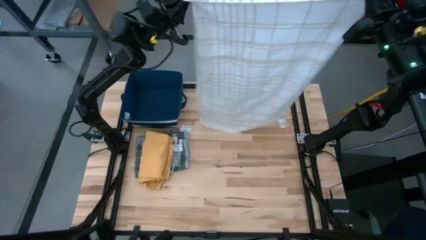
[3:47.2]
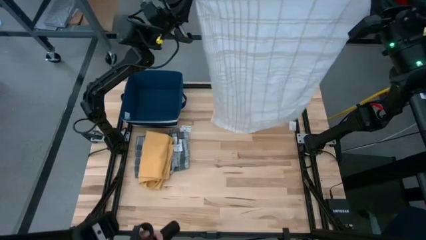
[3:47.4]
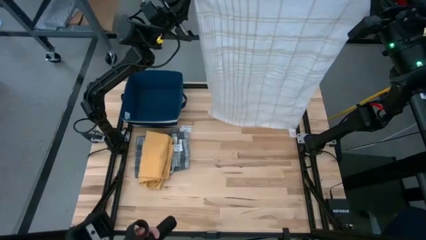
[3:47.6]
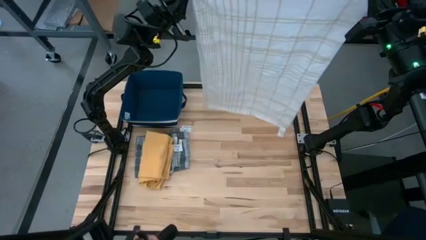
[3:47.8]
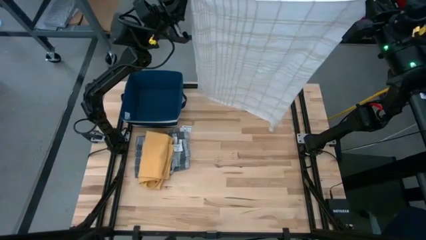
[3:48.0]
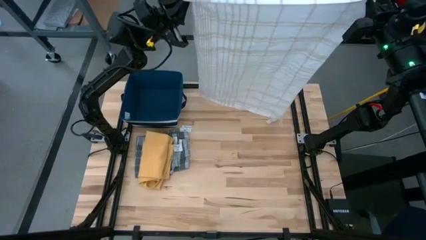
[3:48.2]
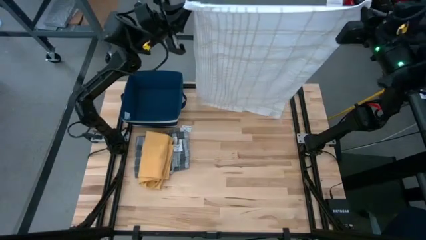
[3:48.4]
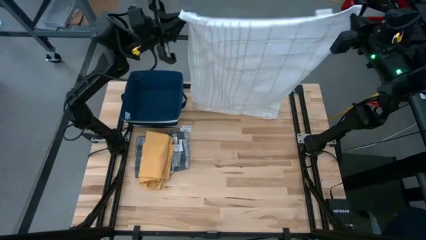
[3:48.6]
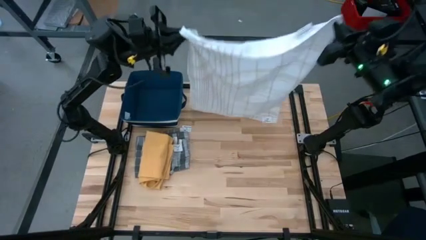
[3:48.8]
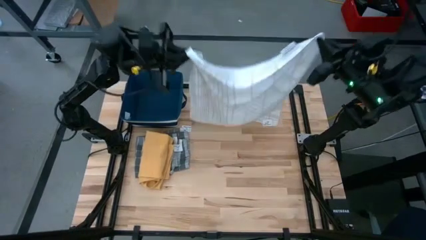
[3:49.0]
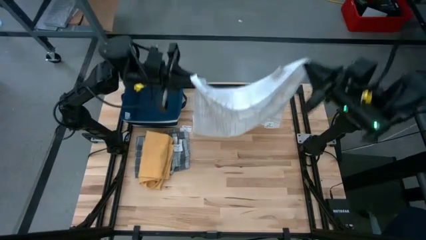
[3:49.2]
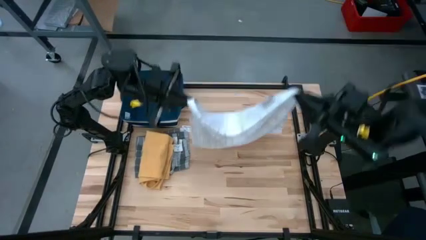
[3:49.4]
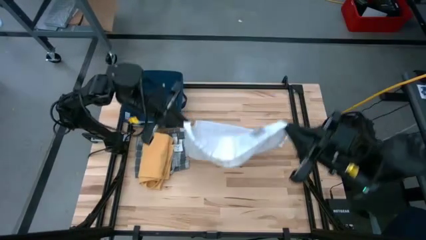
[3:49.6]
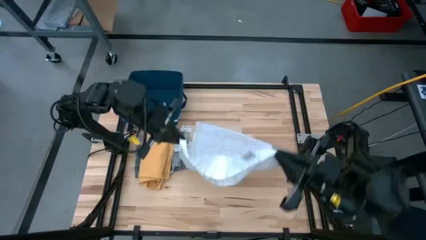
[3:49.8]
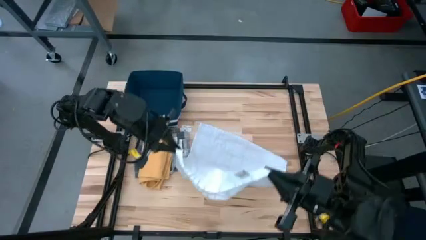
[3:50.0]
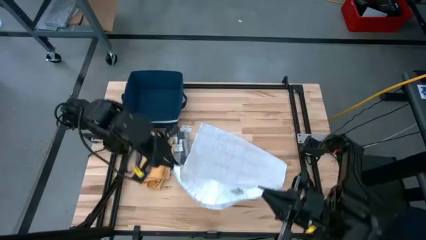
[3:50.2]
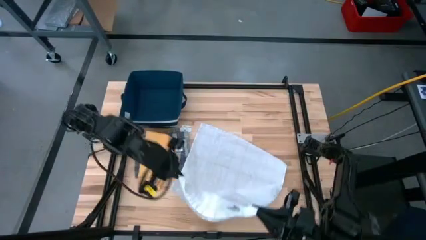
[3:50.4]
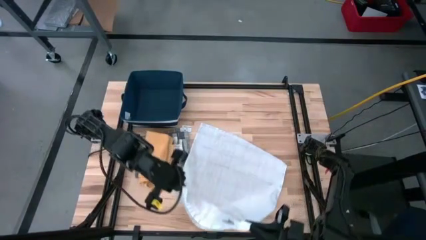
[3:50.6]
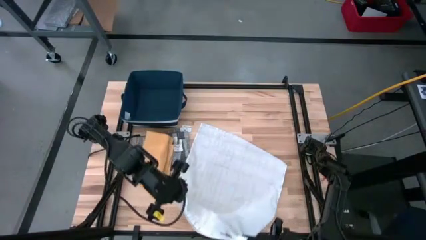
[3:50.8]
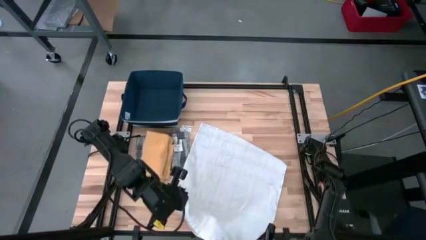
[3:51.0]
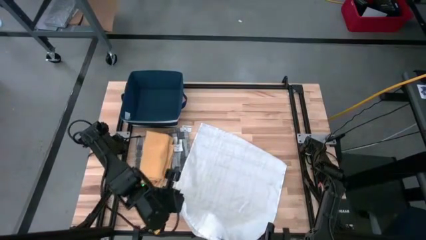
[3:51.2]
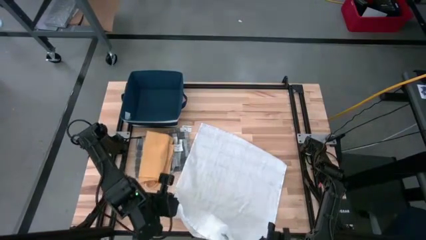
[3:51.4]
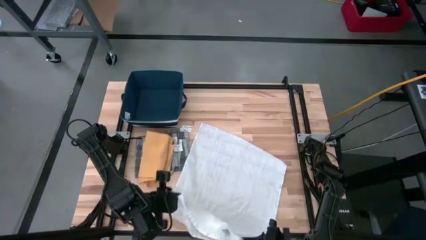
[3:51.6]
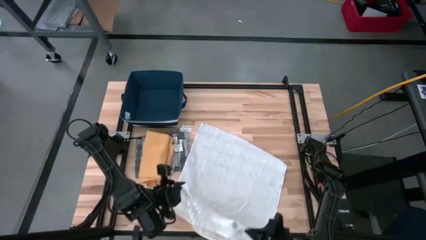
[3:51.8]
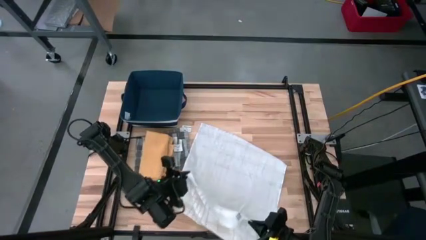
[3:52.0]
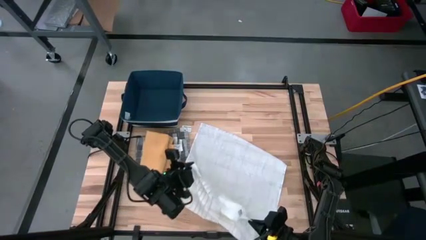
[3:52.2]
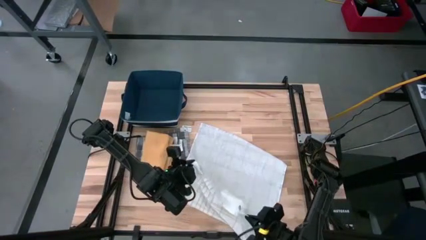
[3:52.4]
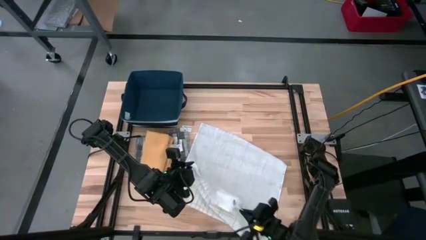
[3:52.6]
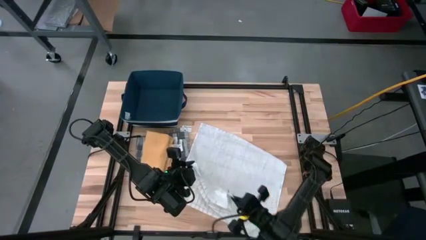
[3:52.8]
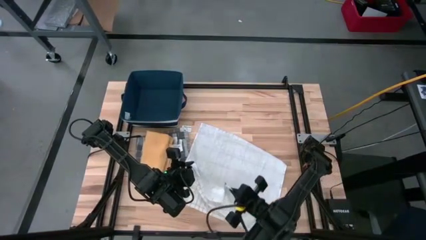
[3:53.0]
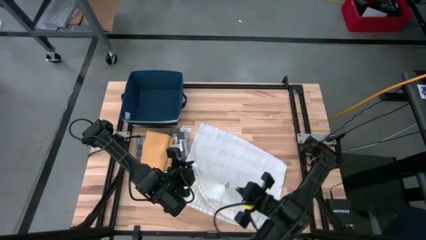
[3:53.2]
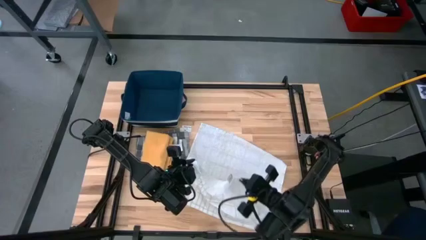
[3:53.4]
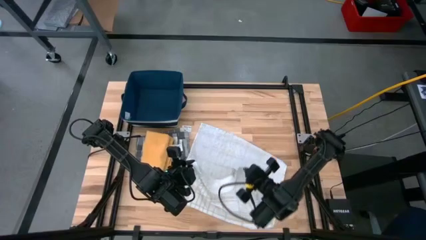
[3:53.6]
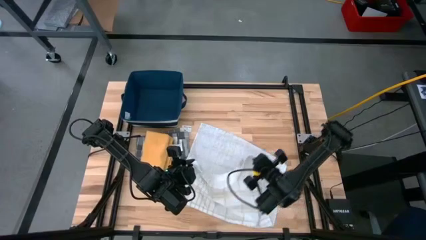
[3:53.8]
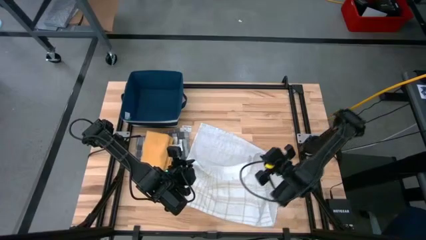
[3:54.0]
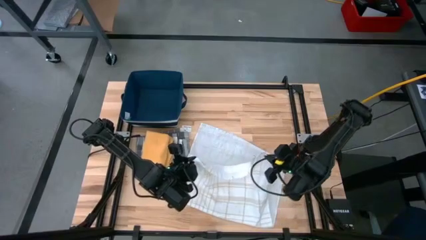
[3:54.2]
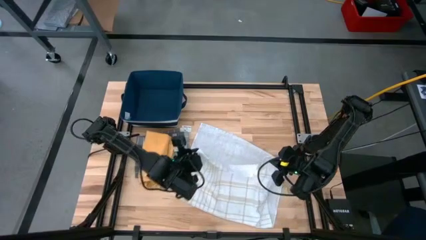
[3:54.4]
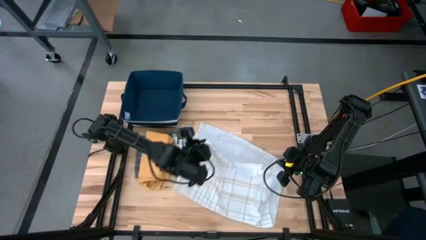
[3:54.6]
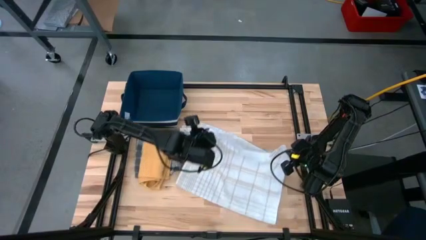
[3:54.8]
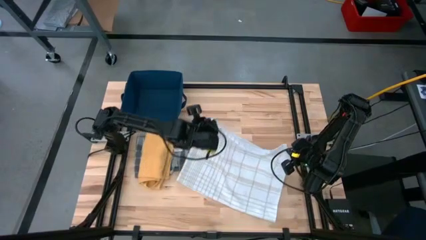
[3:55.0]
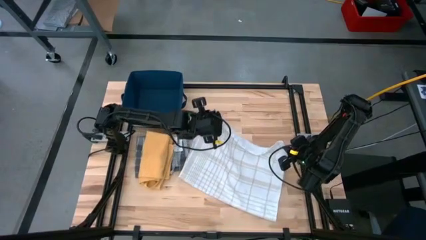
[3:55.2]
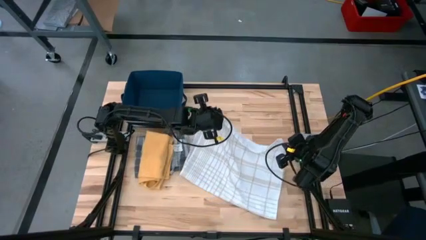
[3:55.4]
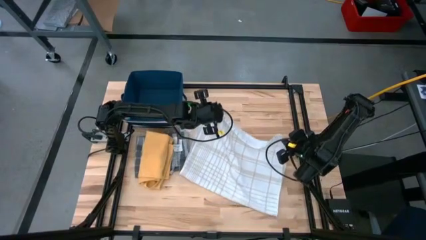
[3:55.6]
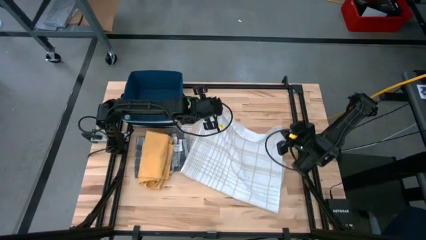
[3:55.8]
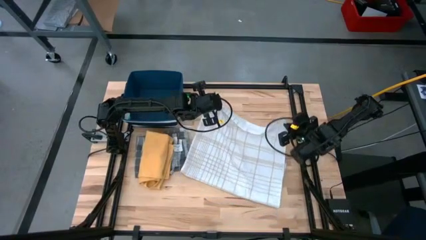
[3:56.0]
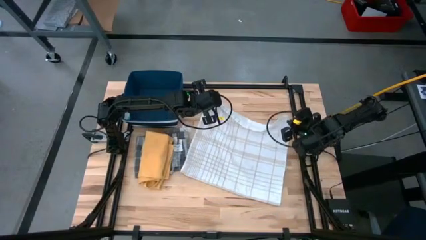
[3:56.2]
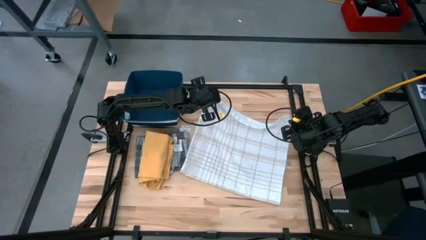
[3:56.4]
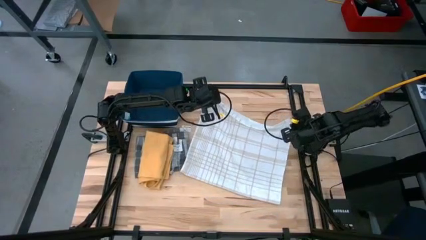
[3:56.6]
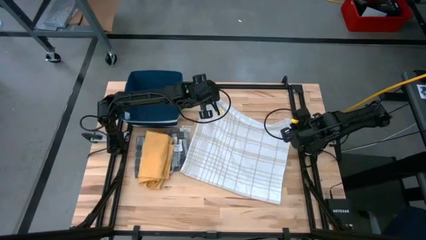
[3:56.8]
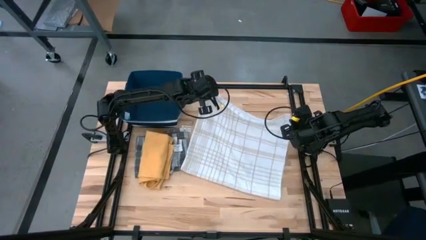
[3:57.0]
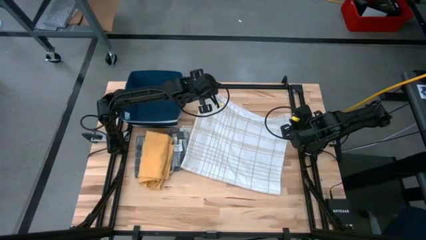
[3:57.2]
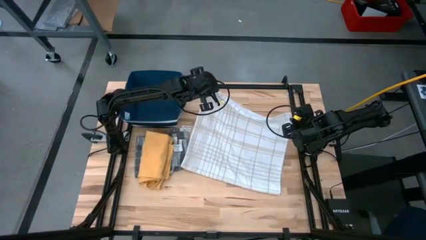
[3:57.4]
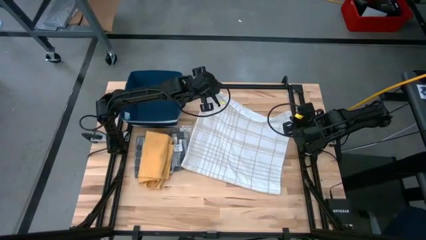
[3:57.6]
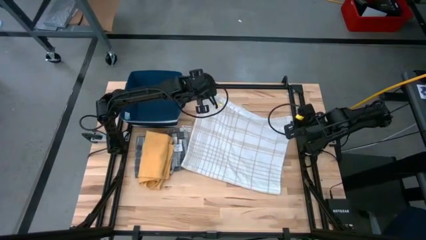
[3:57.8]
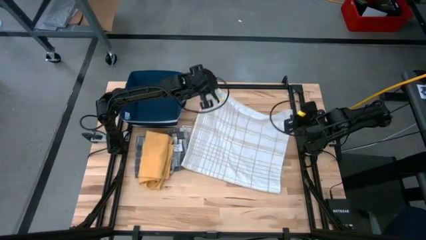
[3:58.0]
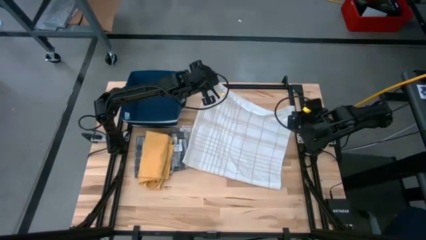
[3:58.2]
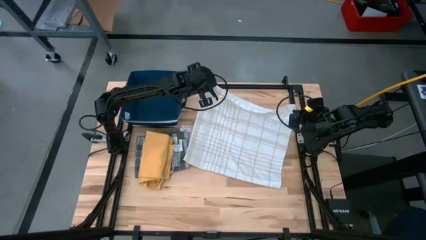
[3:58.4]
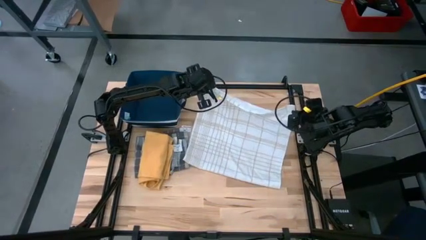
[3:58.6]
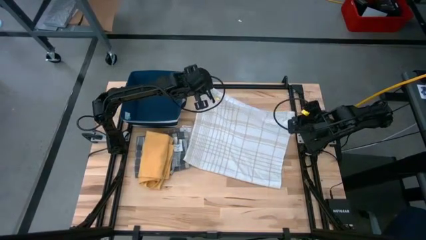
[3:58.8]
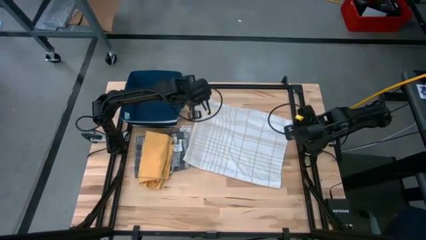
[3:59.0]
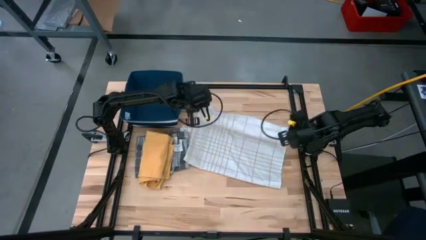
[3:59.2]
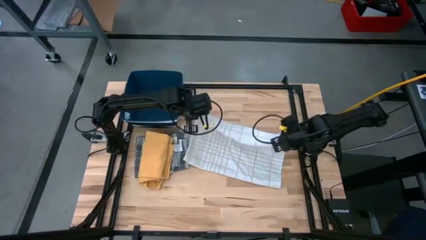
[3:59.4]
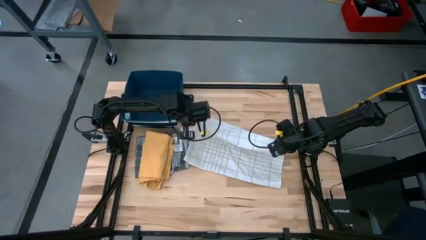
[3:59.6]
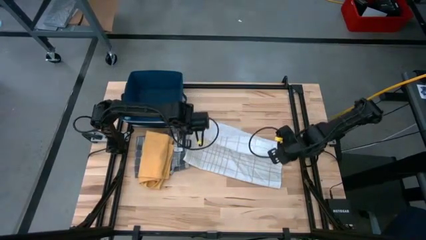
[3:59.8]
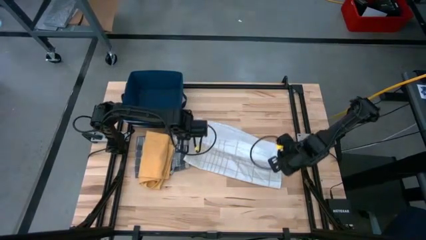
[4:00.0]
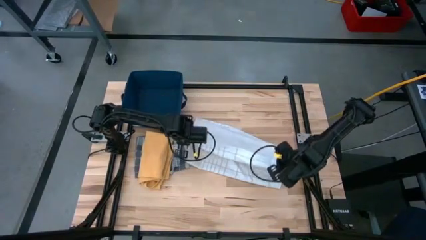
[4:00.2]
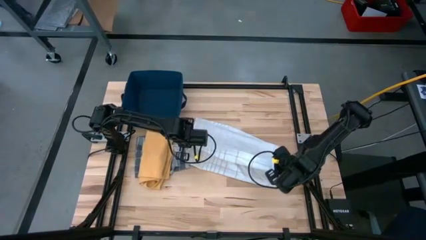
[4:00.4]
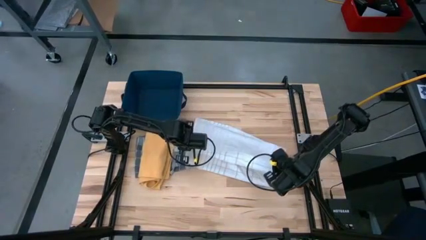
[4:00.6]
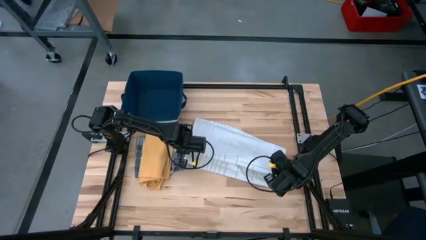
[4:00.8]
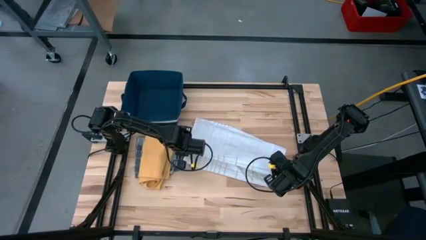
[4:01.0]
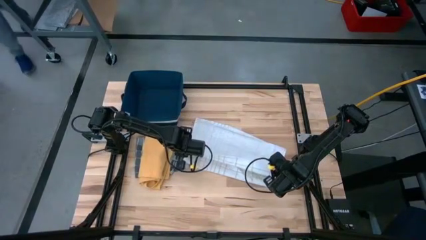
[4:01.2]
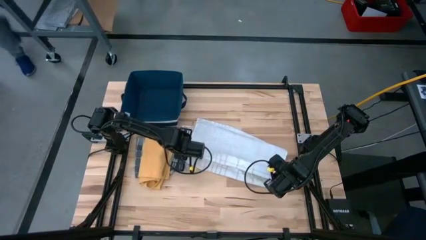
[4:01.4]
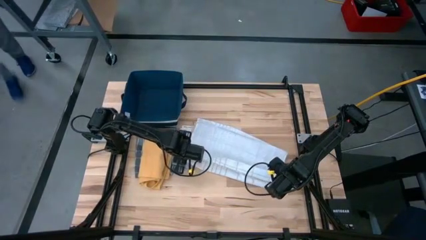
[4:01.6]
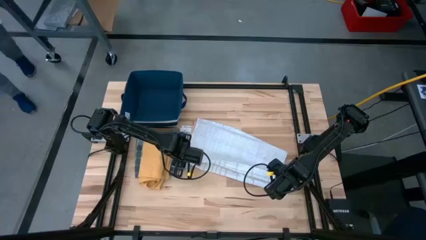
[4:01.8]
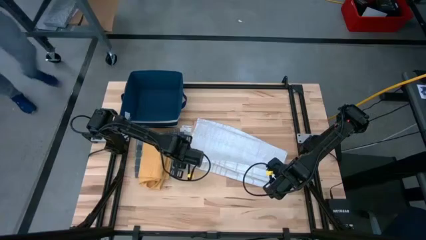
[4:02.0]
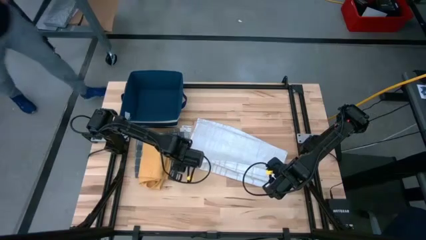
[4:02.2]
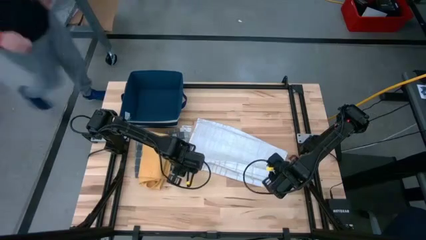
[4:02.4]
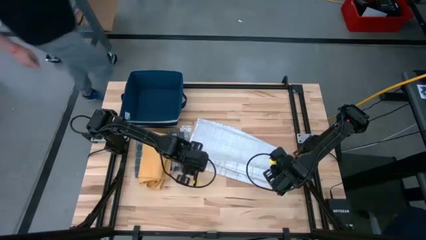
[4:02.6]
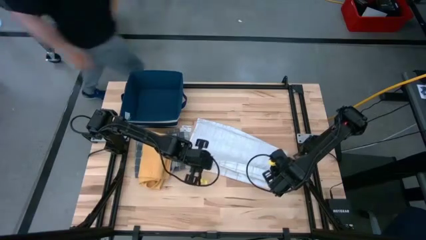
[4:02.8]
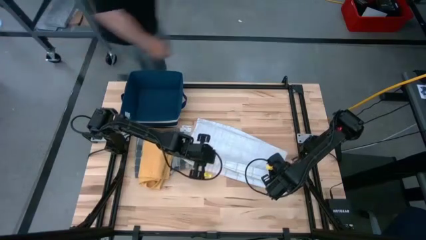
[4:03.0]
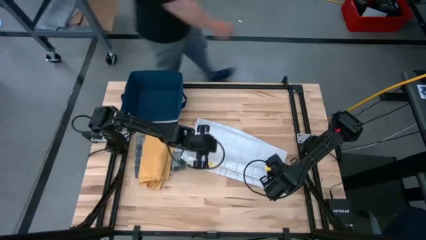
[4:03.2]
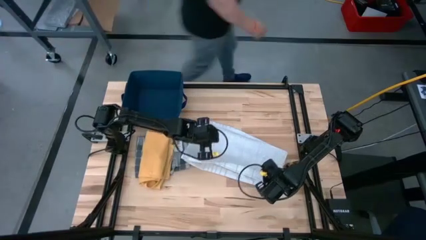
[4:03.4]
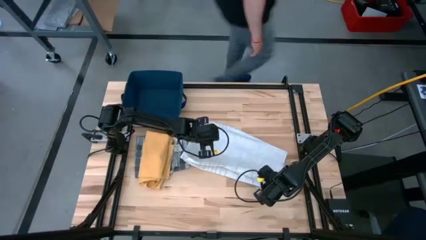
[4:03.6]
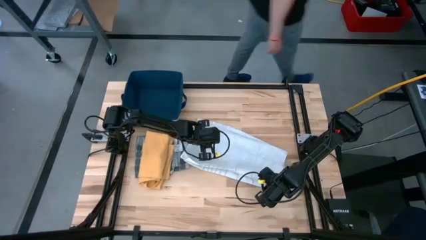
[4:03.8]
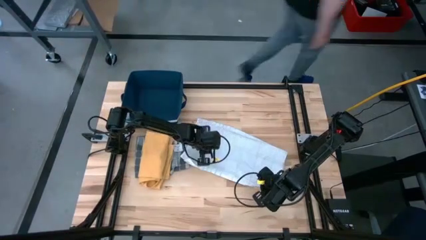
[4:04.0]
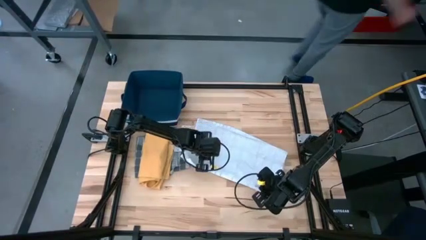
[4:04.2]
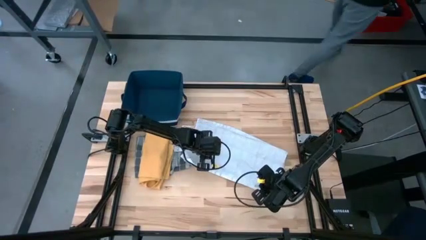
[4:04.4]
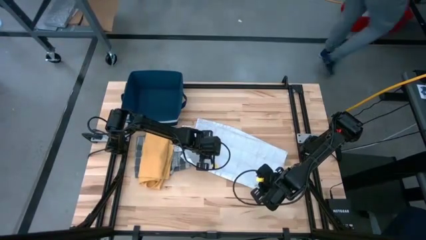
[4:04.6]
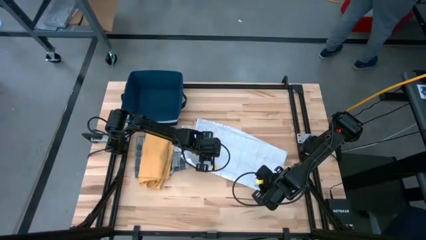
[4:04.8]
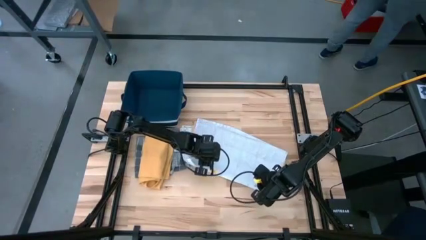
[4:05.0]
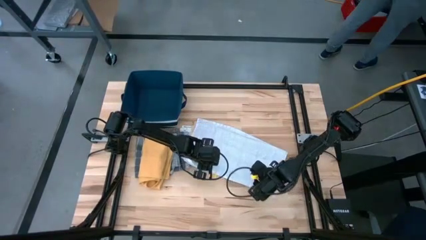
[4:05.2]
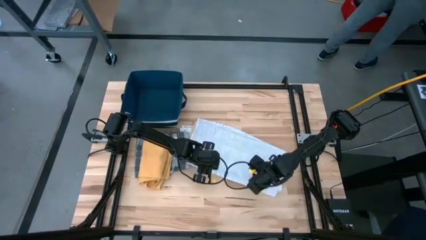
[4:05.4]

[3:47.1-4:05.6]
Task: Fold towel
Fold the white towel
